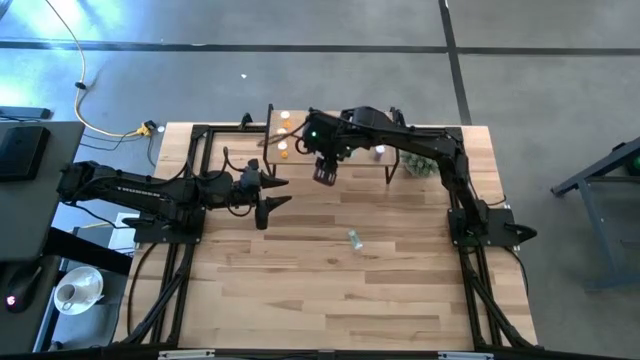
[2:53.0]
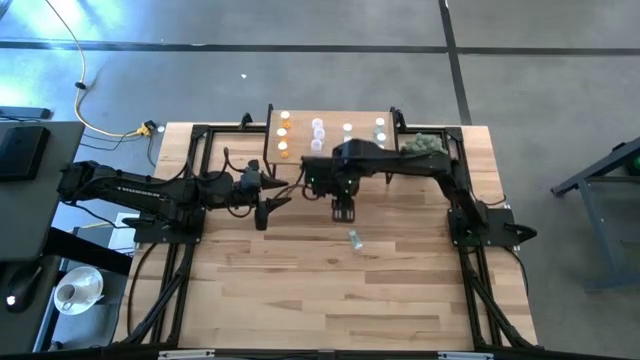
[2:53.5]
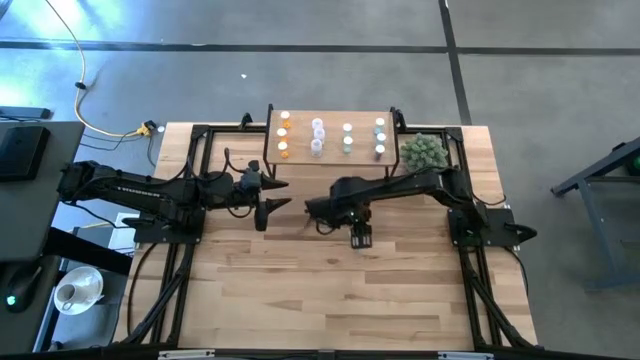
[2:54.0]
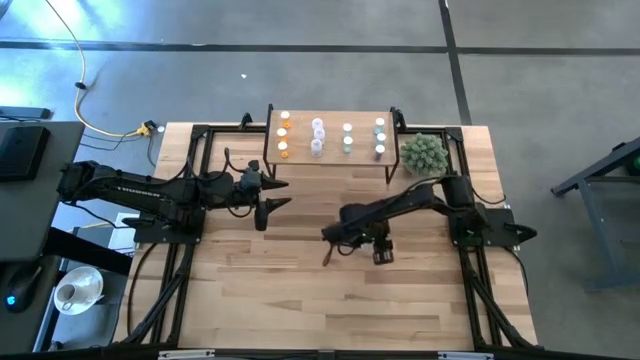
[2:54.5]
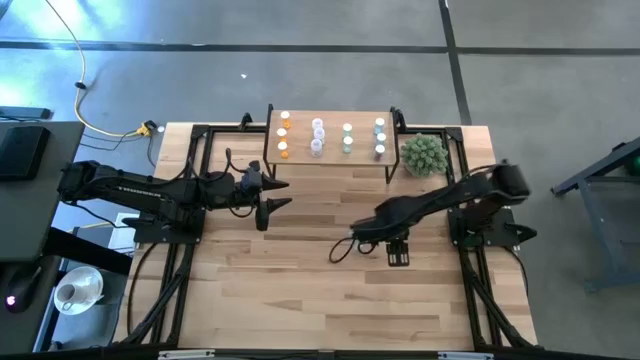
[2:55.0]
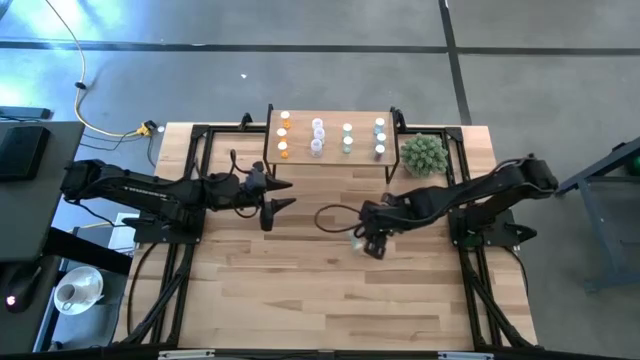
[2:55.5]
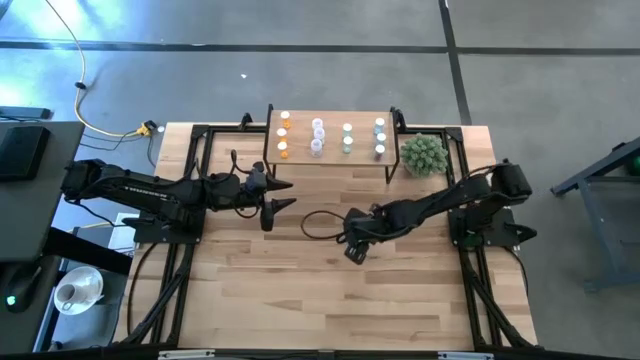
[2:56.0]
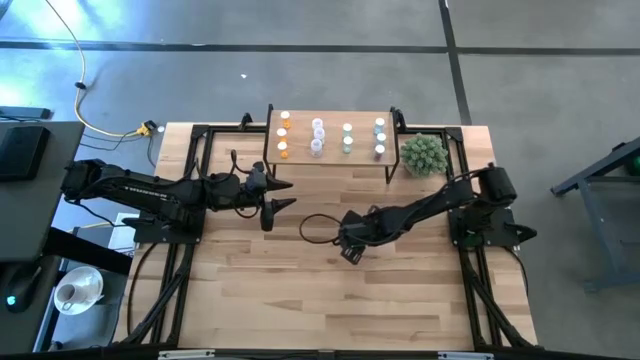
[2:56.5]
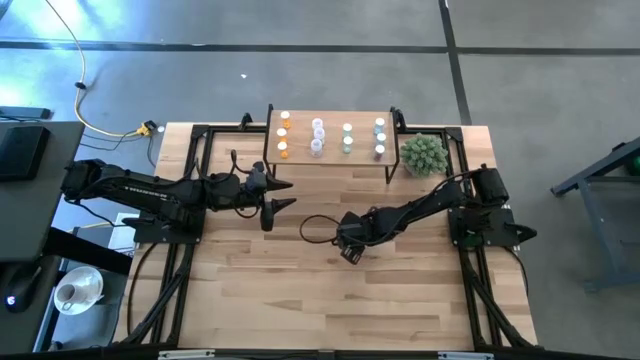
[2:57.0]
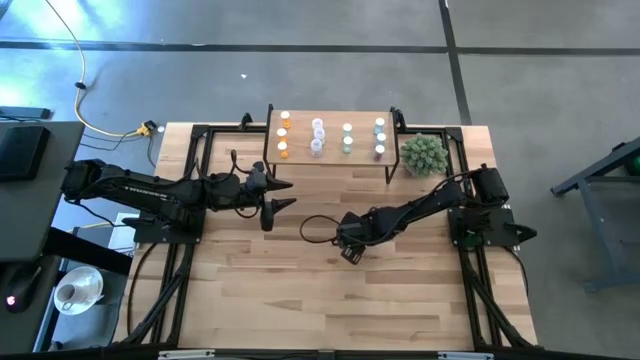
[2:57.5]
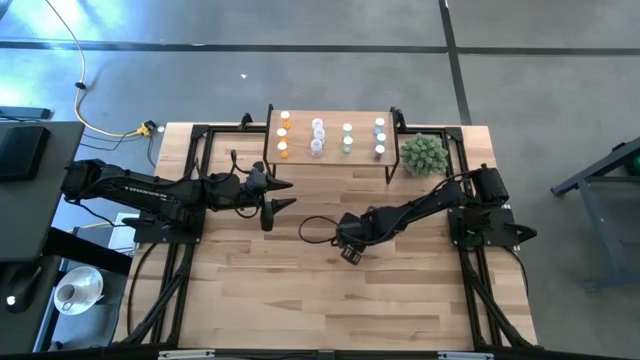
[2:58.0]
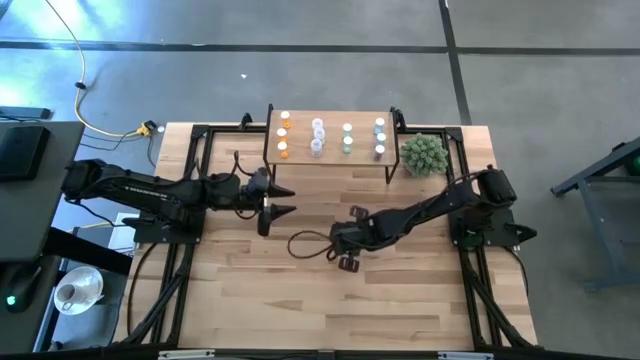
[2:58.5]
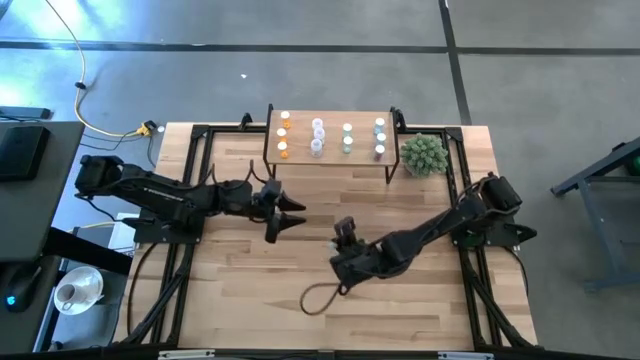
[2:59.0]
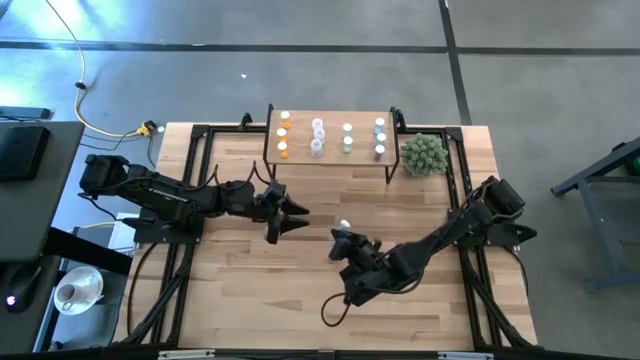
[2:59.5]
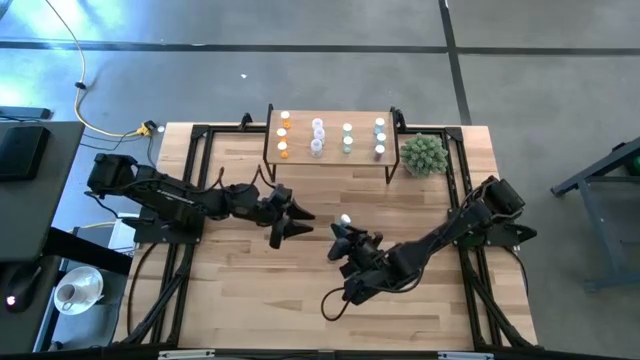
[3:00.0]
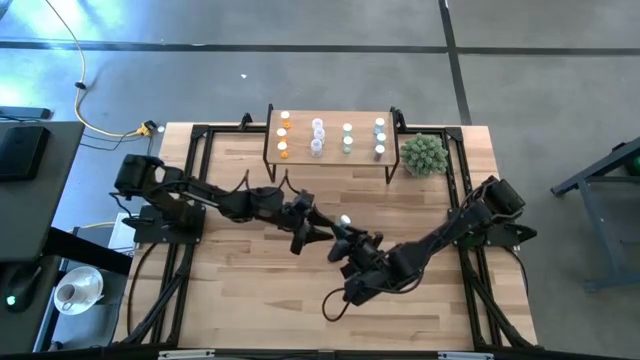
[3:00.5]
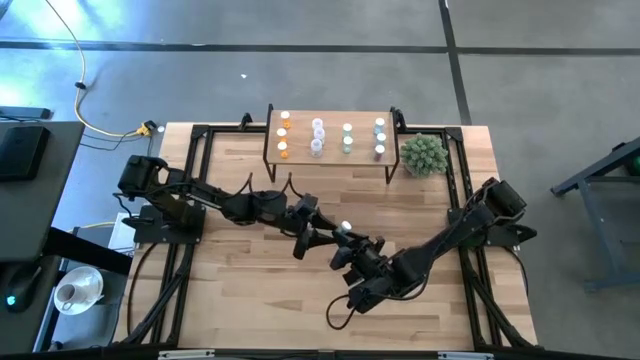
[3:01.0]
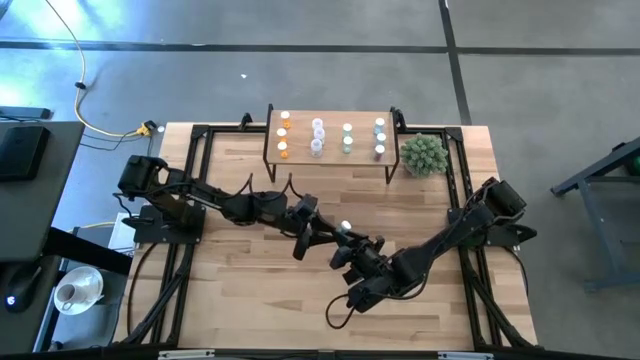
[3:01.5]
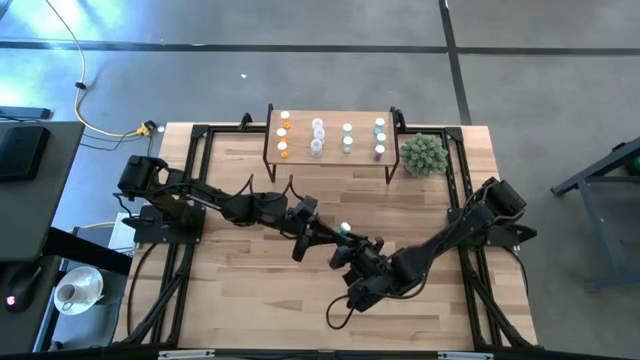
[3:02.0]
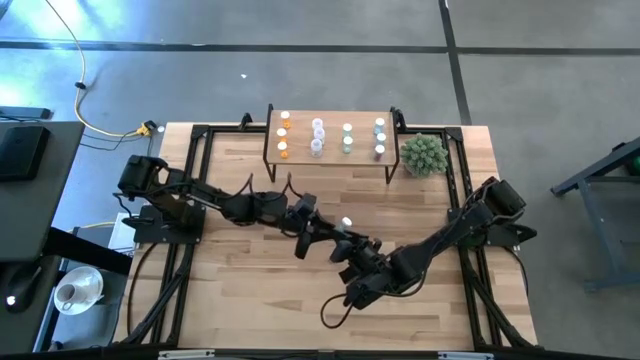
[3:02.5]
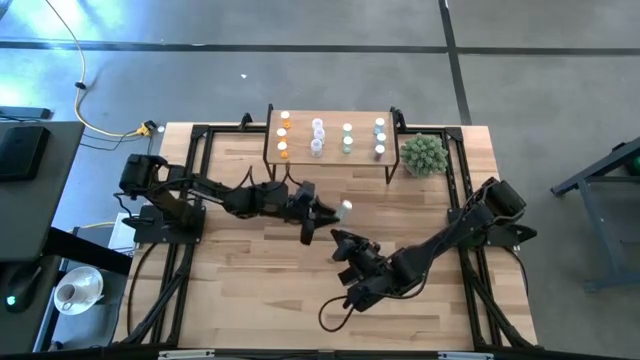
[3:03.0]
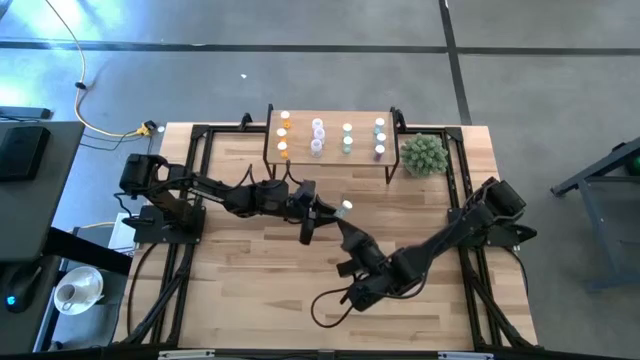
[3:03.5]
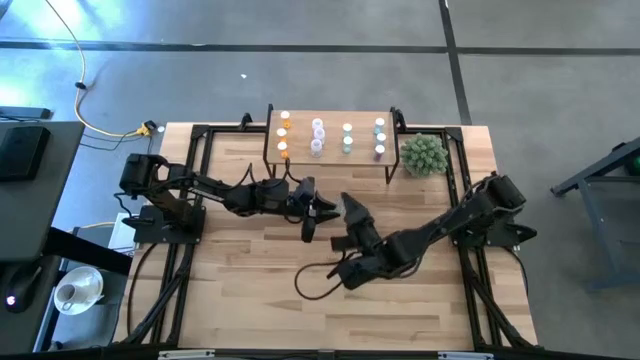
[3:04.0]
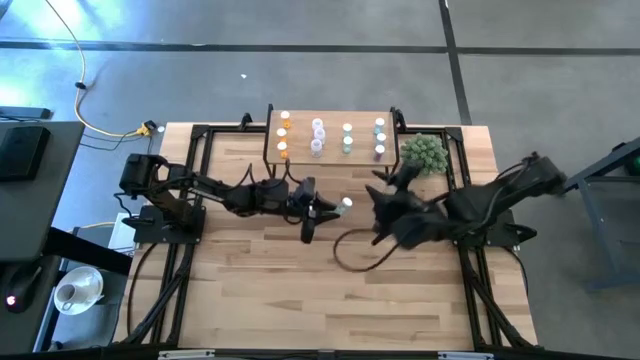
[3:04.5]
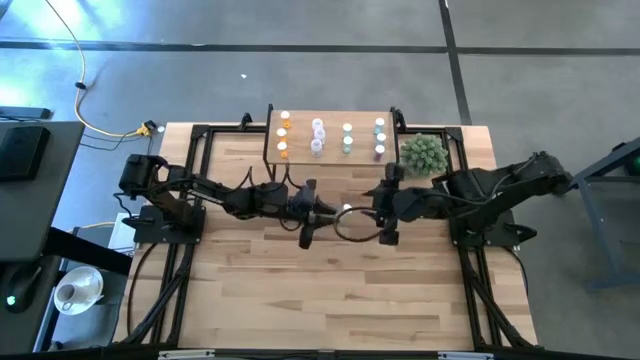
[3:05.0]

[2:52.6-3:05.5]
Task: Pick and place medicine bottles onto shelf by color
Put the green pill bottle on the shelf and aligned with the other green pill bottles

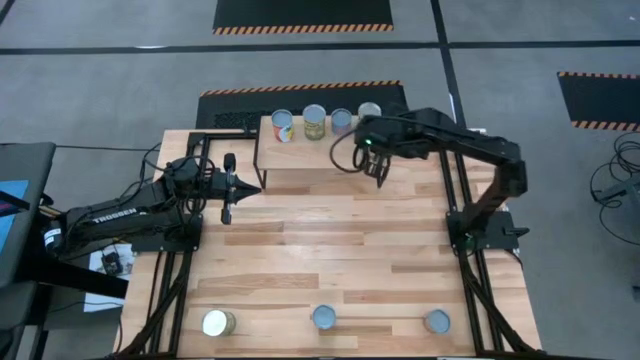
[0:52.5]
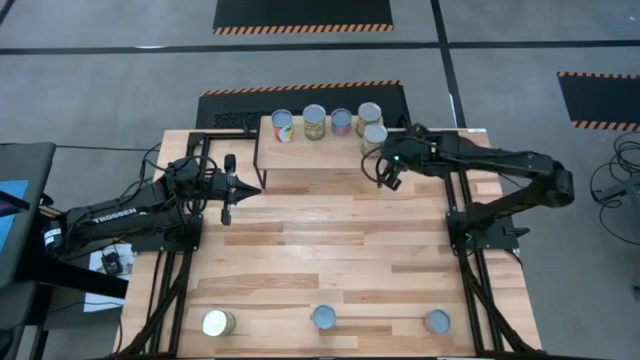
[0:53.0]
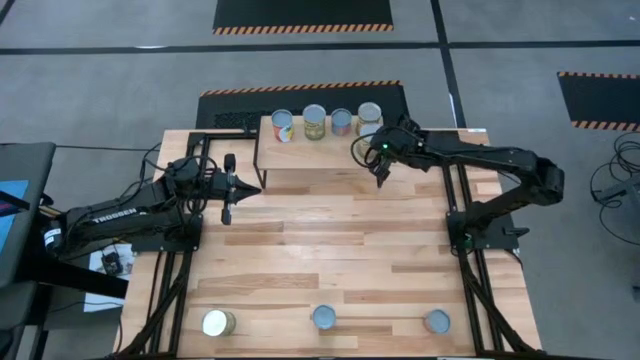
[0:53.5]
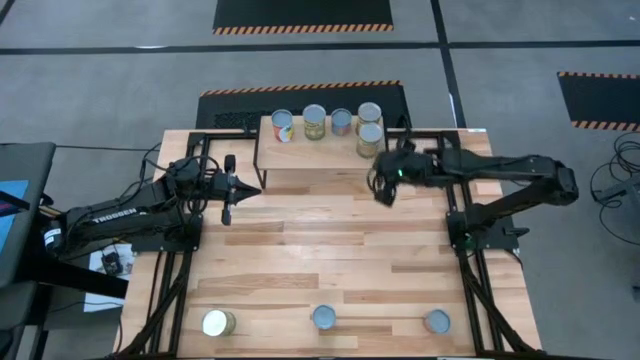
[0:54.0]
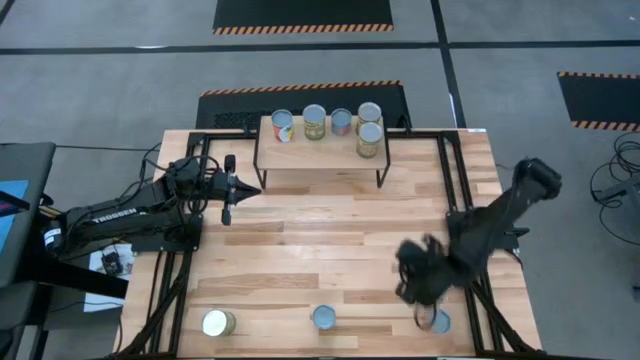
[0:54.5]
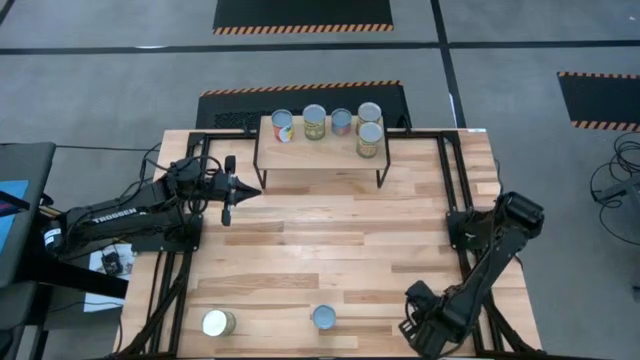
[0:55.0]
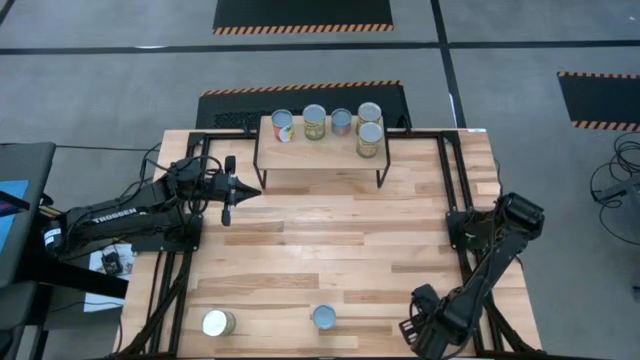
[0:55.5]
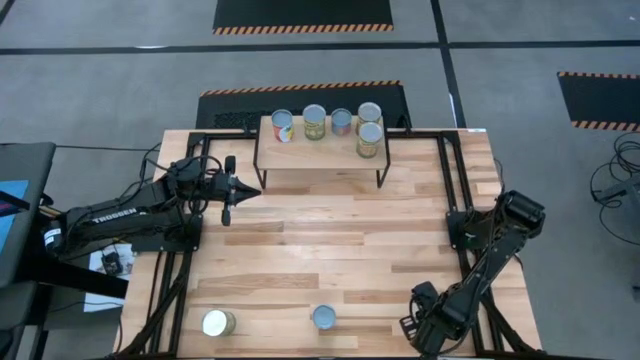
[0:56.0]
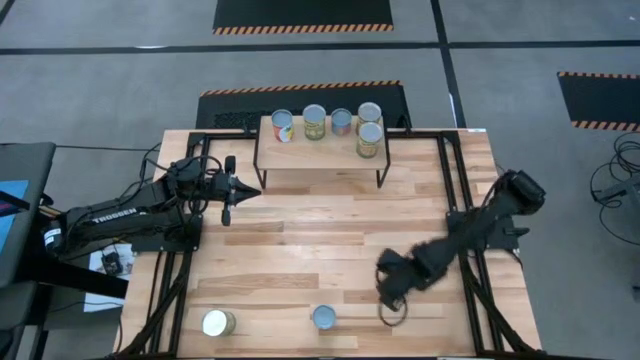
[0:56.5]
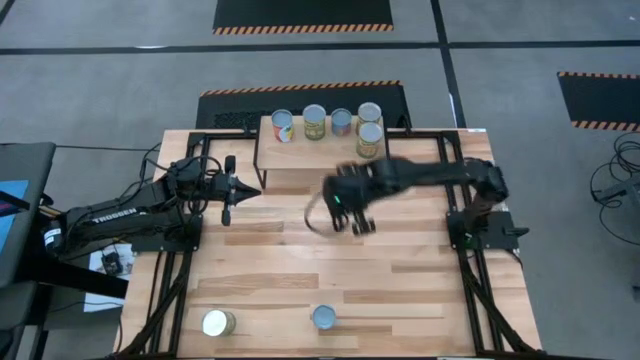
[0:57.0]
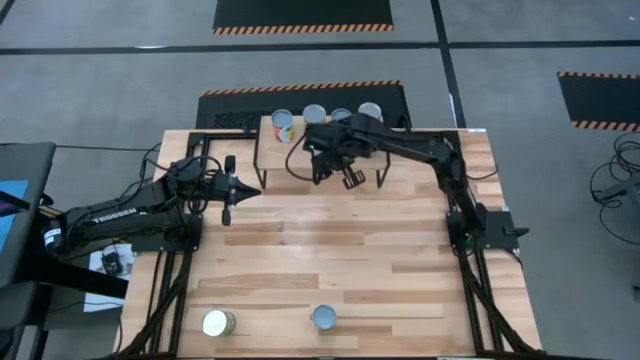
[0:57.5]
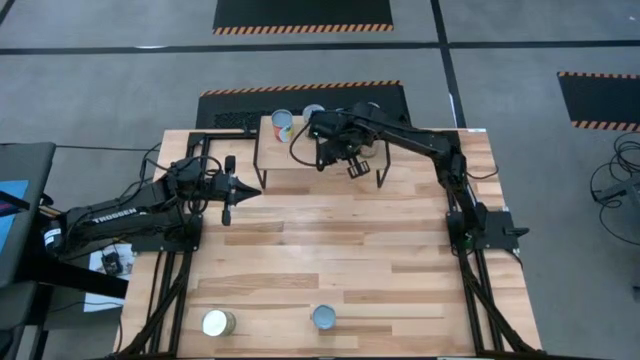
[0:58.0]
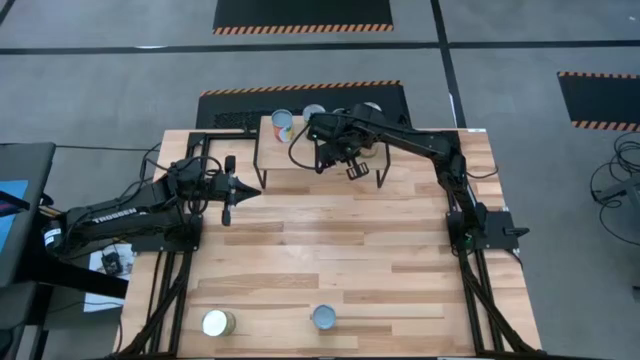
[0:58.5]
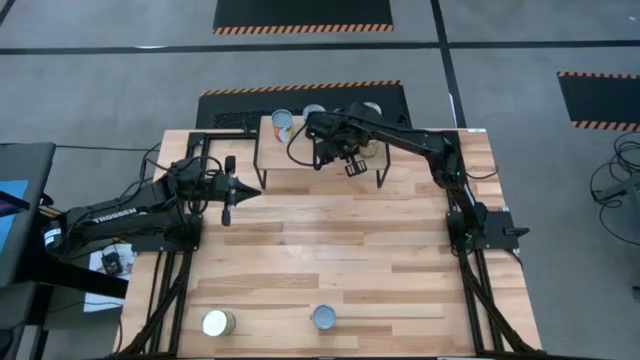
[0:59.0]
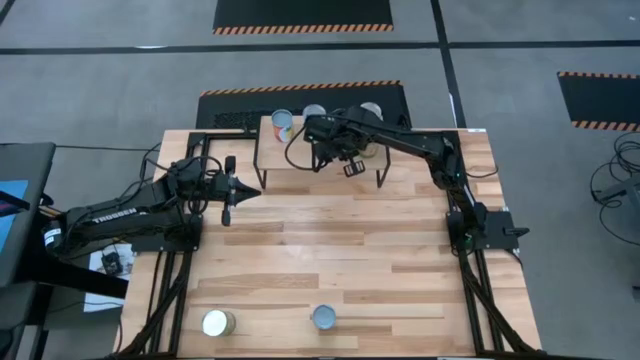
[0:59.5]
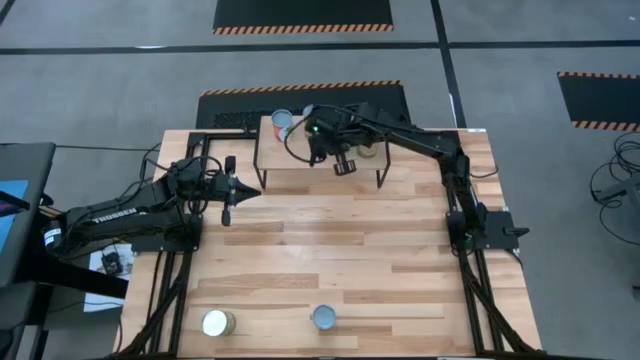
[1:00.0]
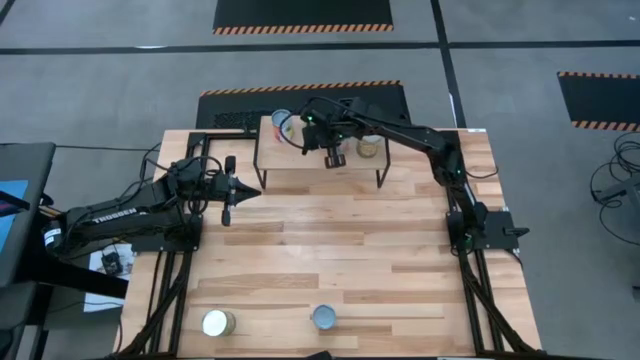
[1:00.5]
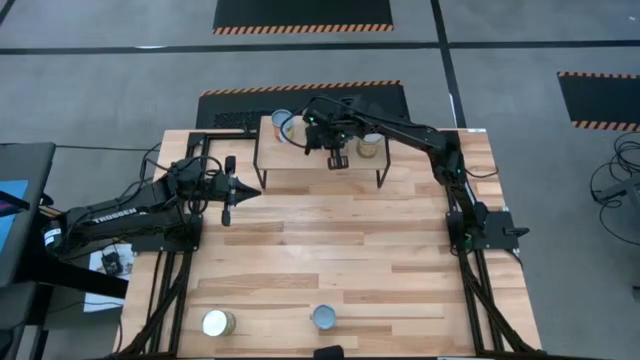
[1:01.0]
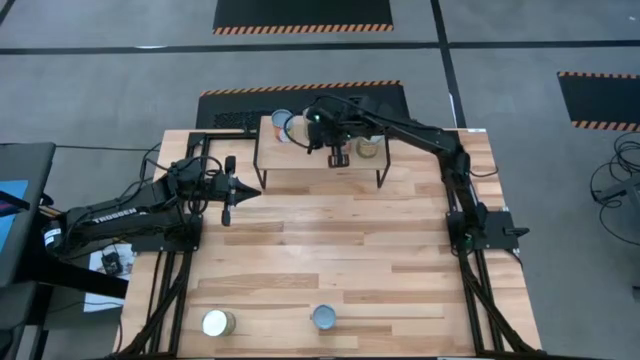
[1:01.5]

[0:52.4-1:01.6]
Task: Pick and place cans onto a shelf
Put the small blue canned orange on the shelf and align it with the canned corn
